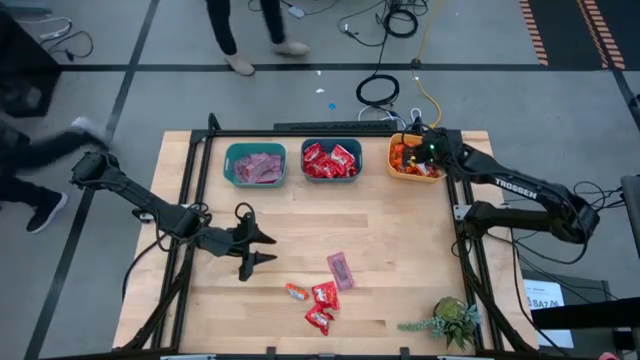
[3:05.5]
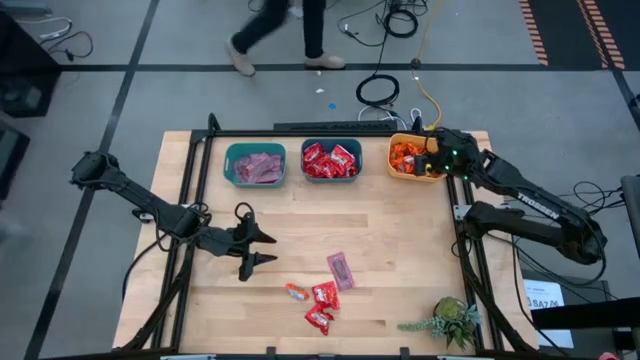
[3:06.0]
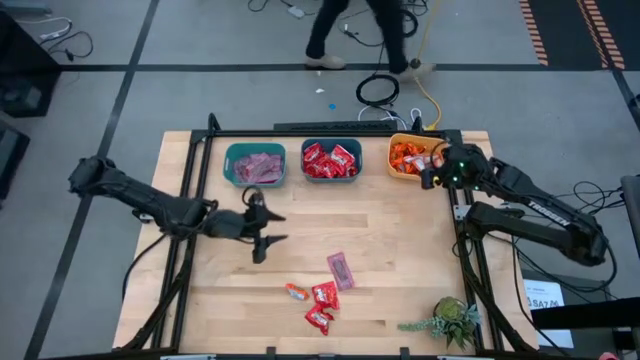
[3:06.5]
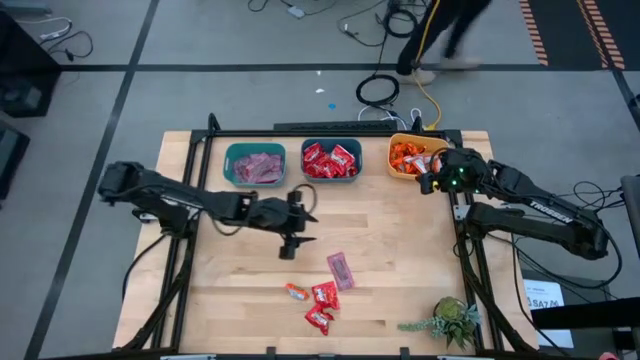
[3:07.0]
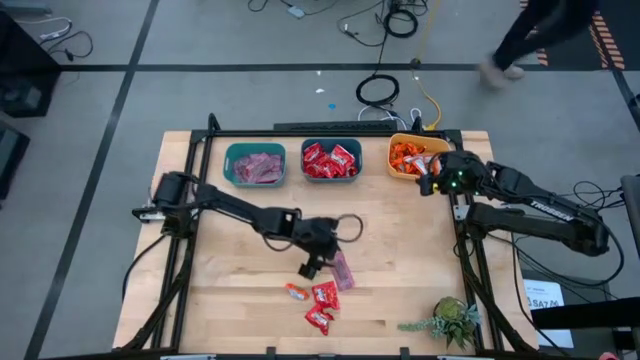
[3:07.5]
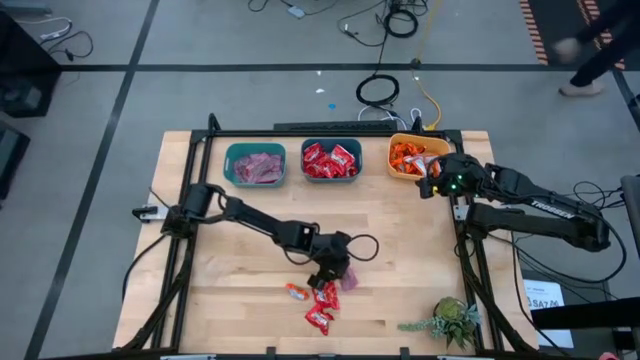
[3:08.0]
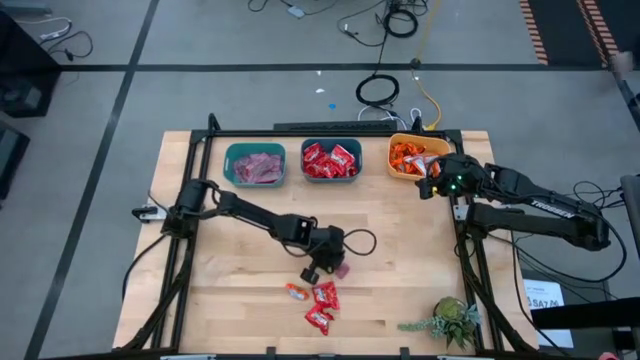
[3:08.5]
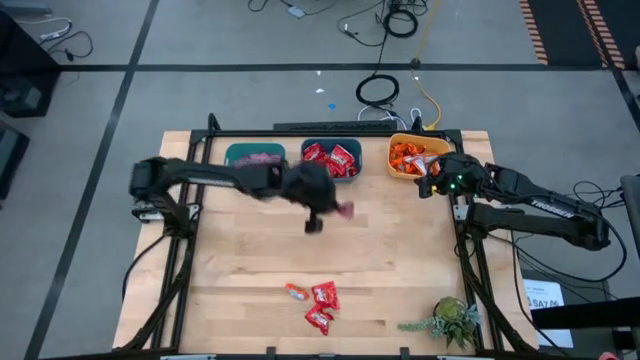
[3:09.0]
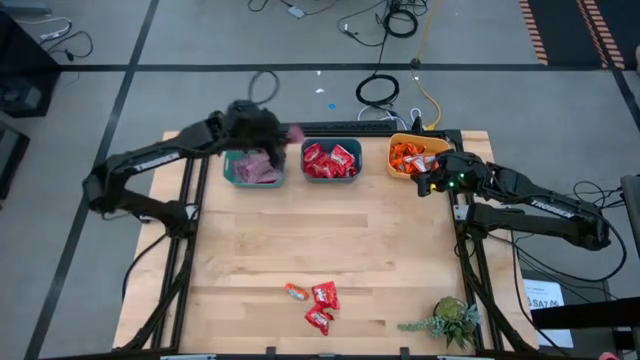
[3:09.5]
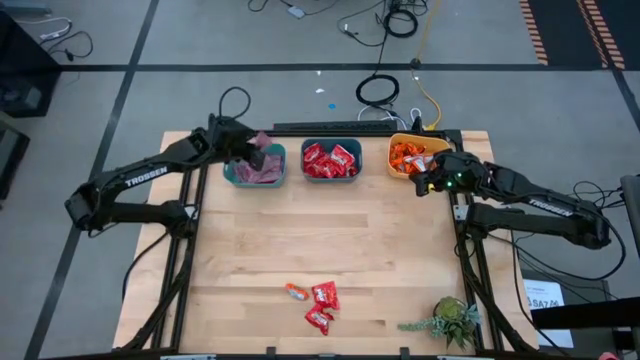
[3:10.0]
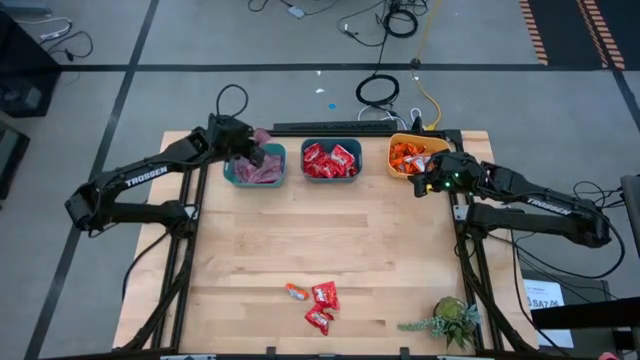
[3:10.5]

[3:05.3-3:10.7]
Task: Sort candy
Put the red chocolate into the green bin

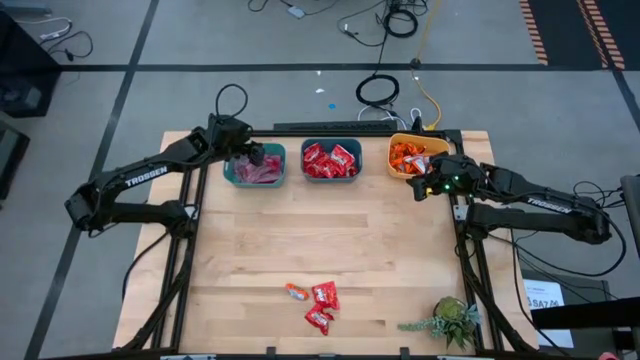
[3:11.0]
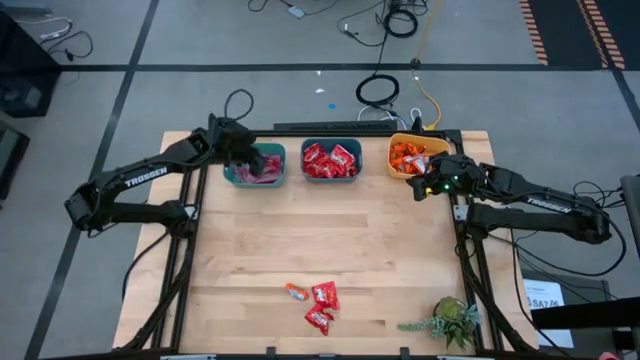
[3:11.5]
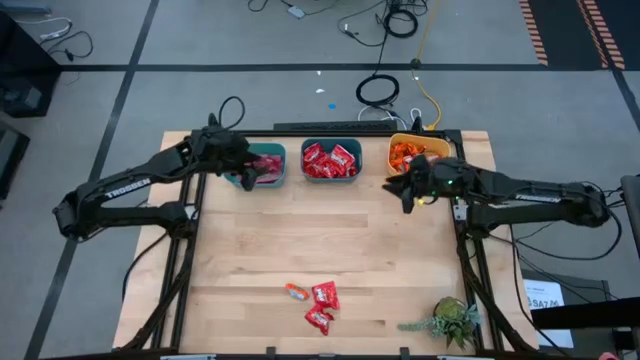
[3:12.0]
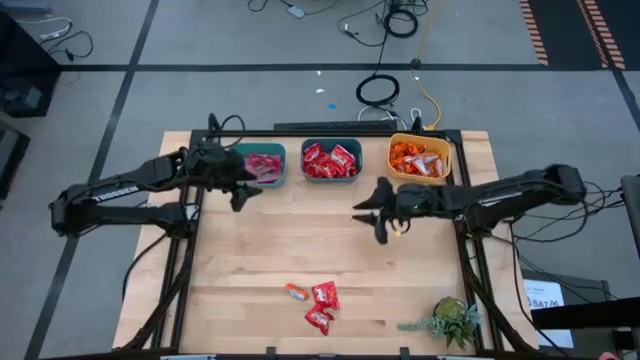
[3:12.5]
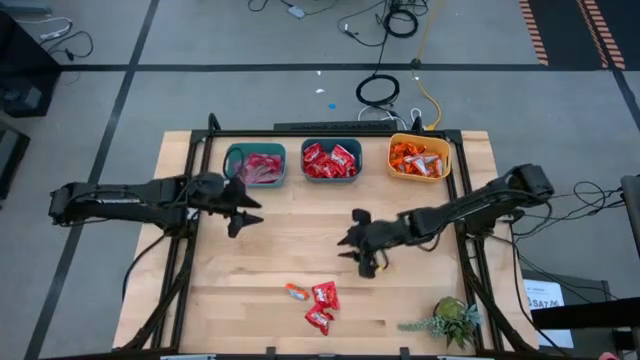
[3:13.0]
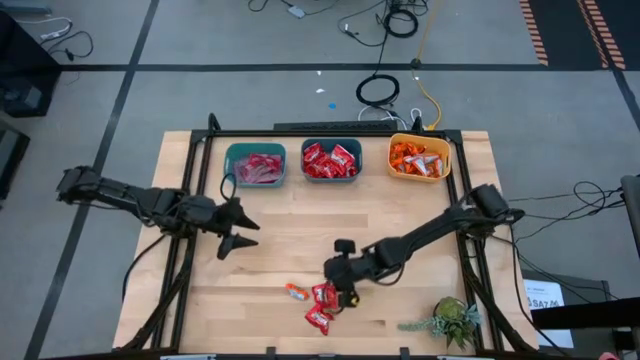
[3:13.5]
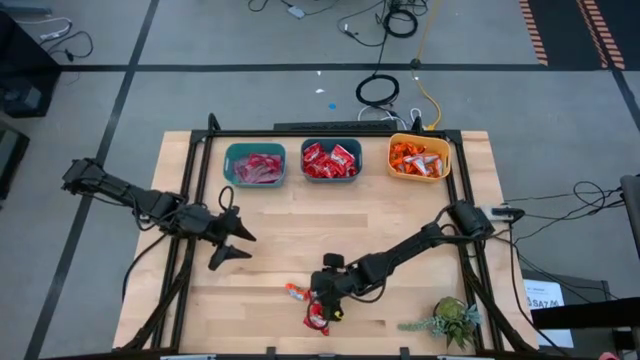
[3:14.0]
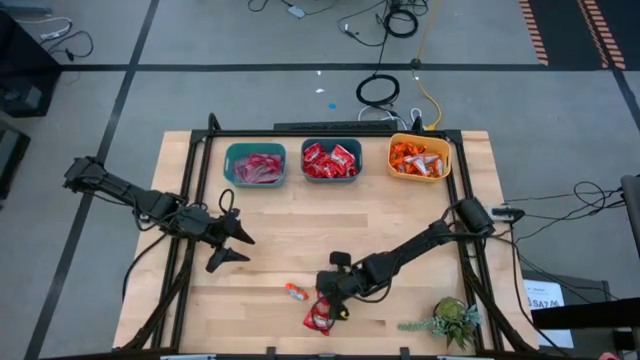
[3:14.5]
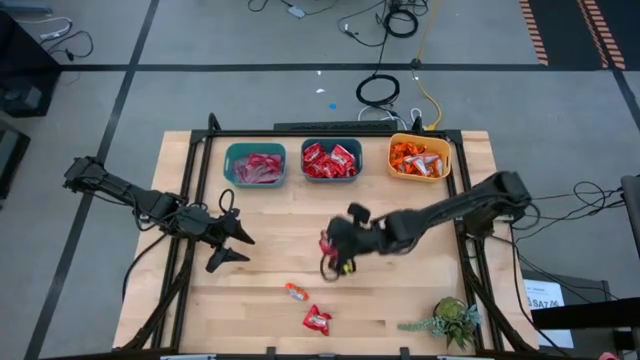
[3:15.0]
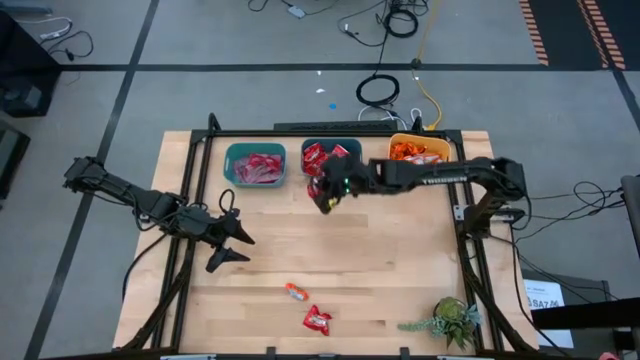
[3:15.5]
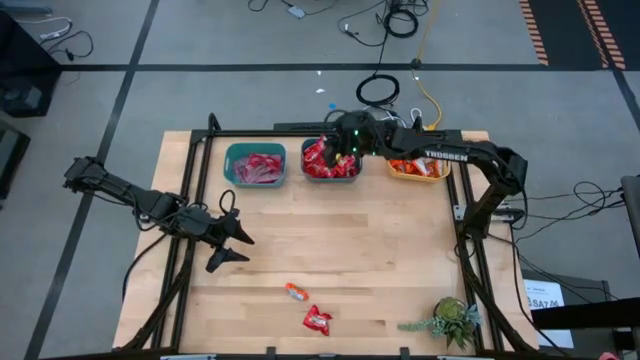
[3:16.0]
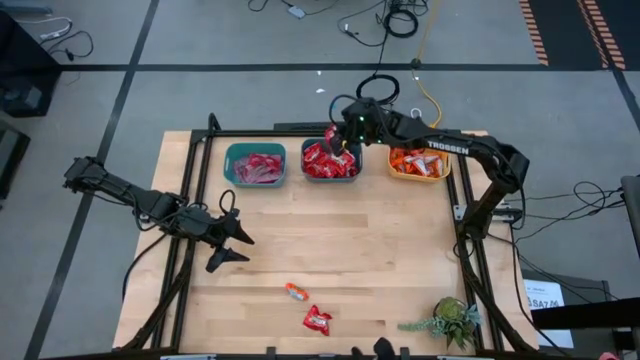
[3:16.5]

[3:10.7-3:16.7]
Put the red candy into the blue bin

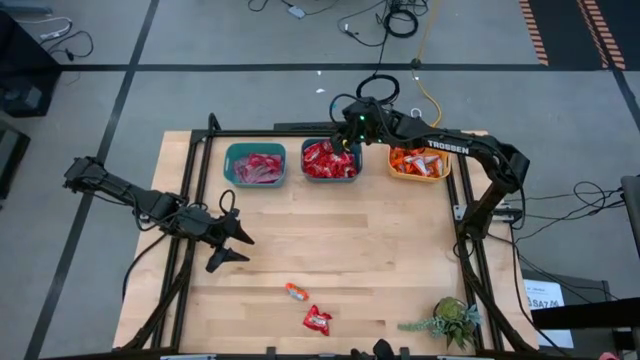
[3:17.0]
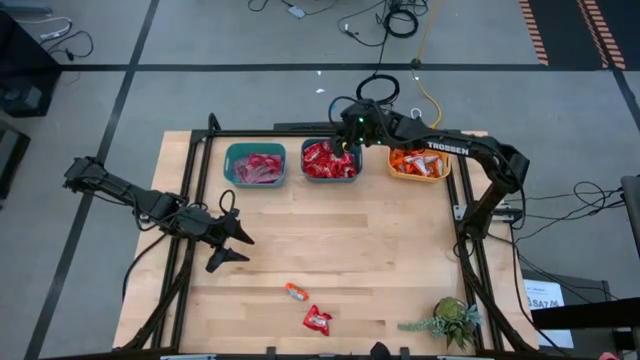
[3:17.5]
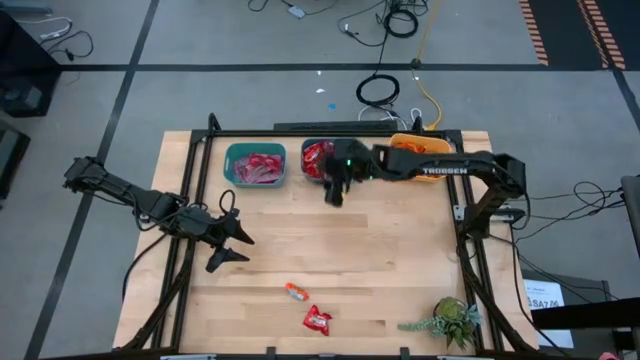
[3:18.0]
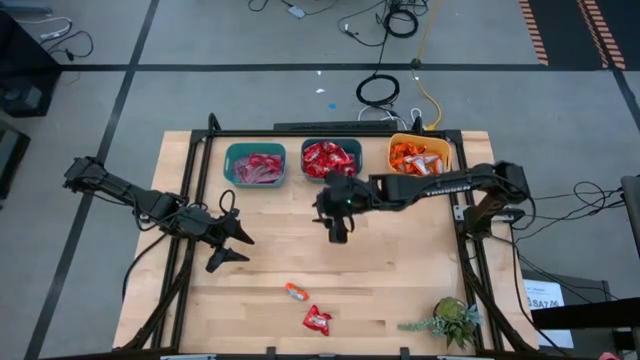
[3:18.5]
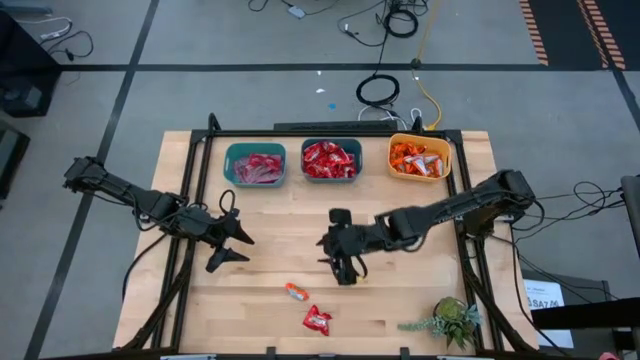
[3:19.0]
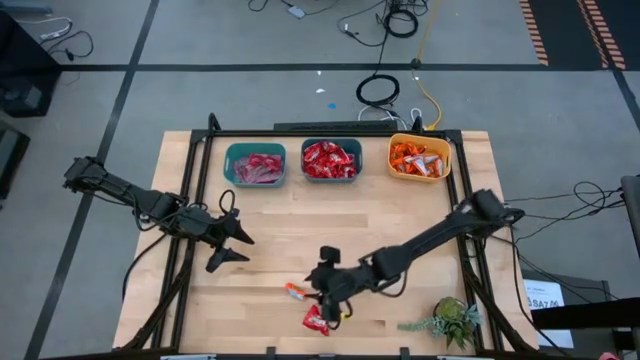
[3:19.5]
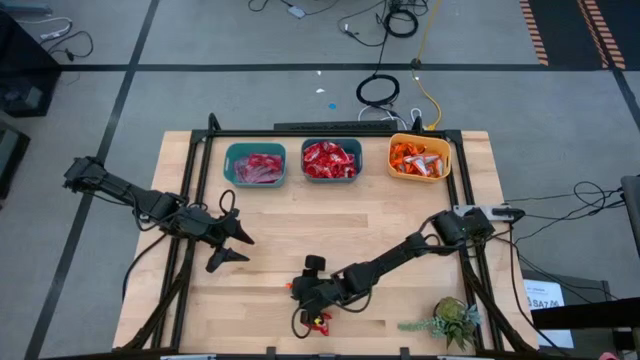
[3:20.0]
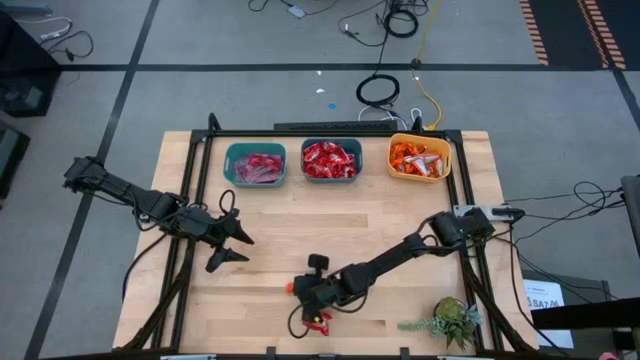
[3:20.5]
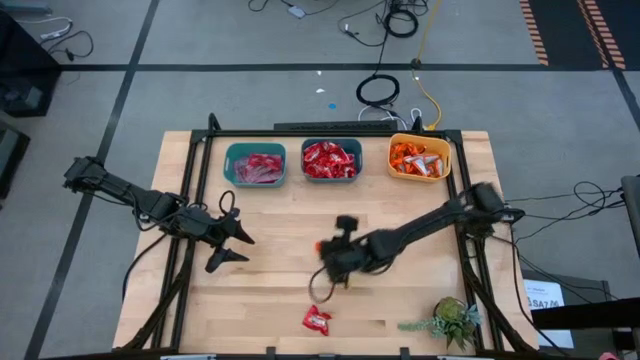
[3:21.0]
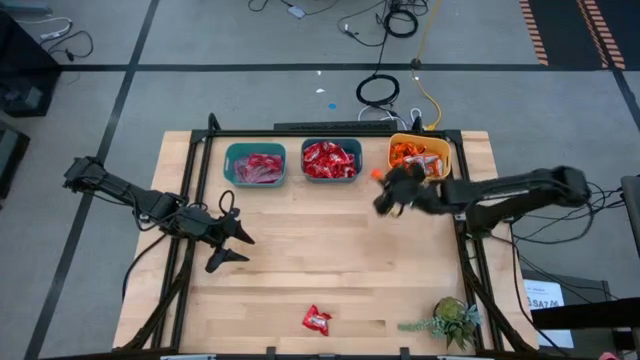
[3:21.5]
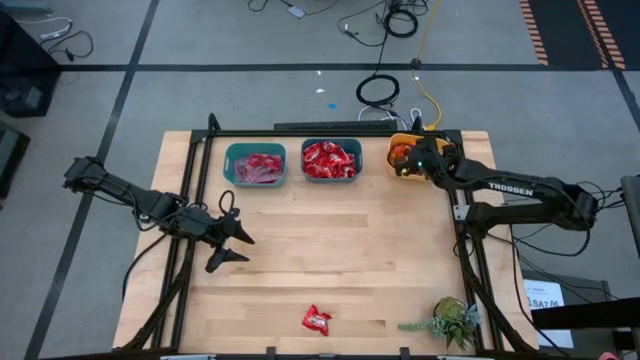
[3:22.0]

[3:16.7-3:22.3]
Put the orange chocolate into the yellow bin

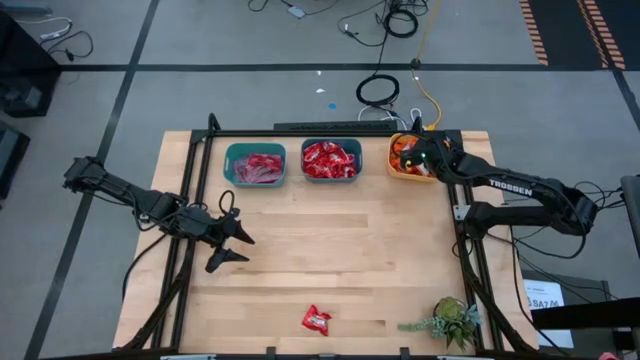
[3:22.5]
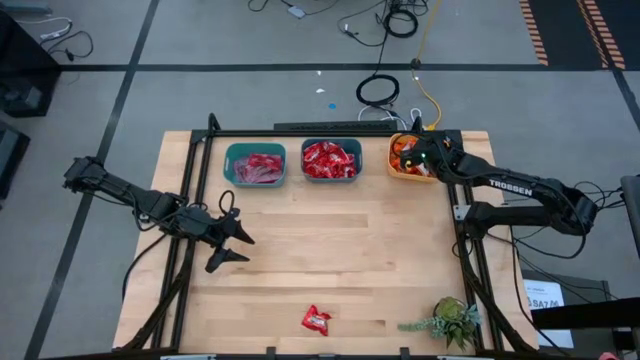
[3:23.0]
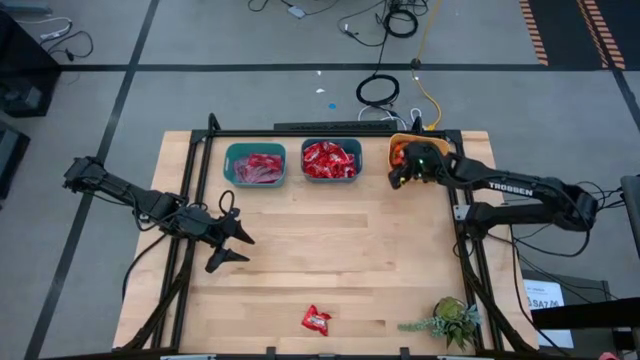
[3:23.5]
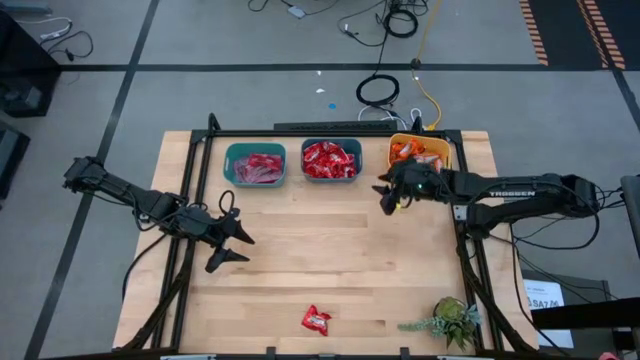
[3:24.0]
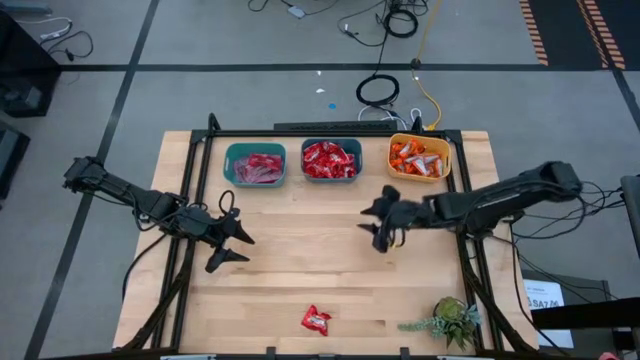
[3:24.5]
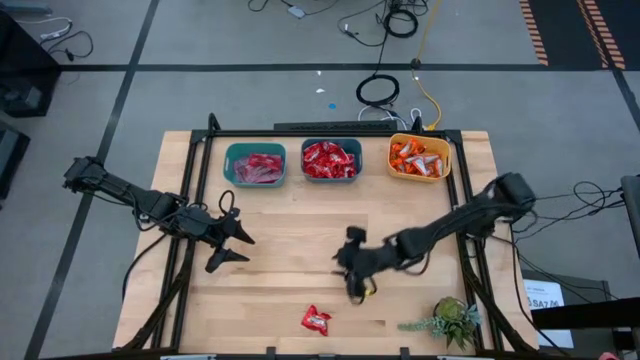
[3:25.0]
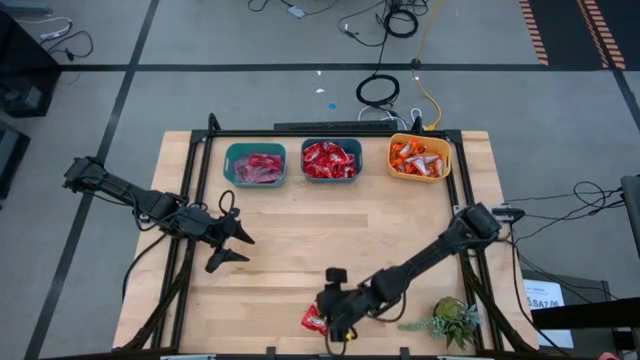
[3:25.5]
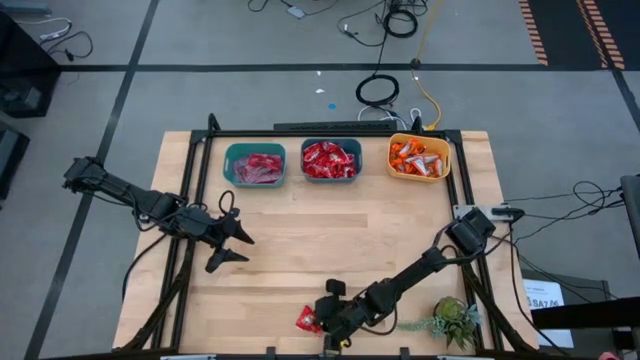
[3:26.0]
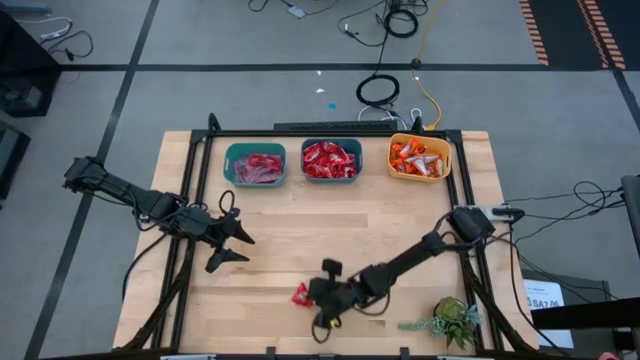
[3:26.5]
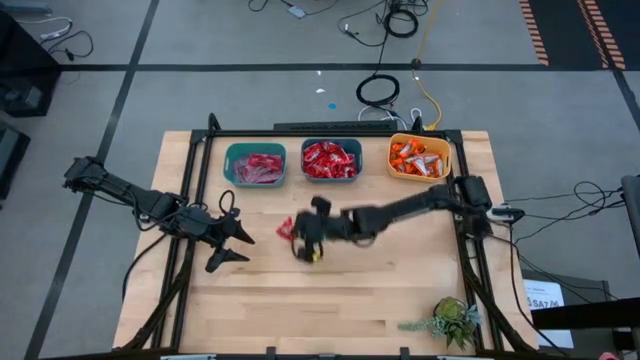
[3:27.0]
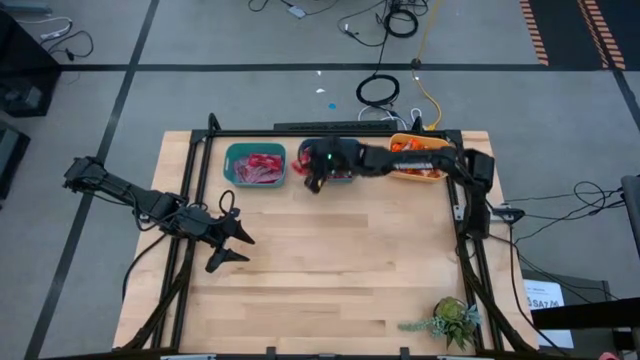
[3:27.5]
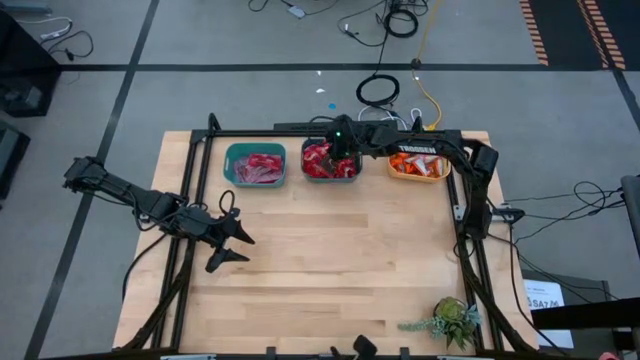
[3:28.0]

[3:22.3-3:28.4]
Put the red candy into the blue bin
